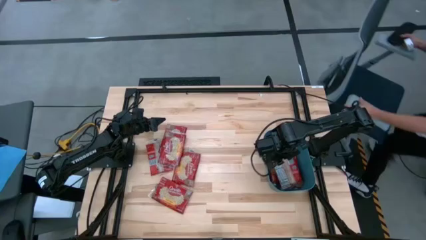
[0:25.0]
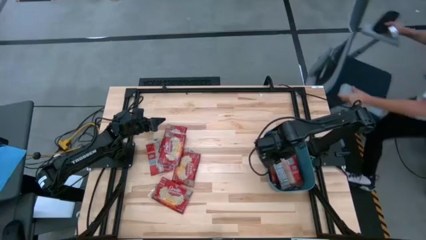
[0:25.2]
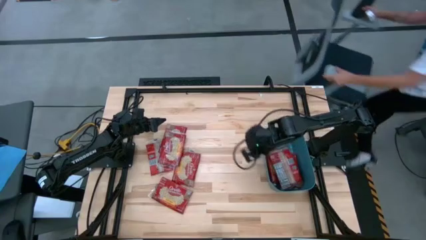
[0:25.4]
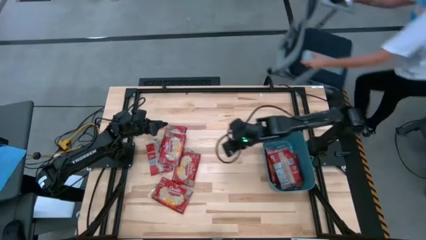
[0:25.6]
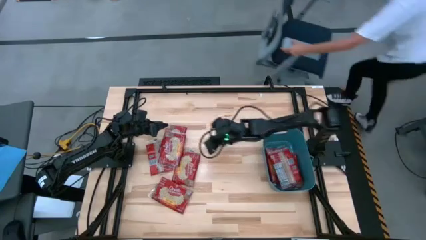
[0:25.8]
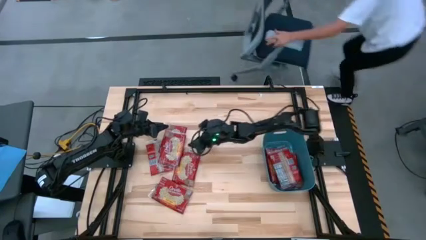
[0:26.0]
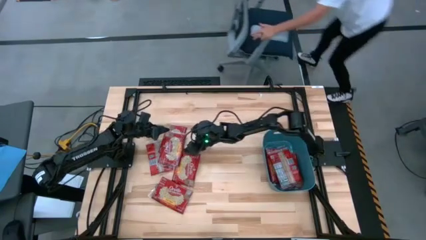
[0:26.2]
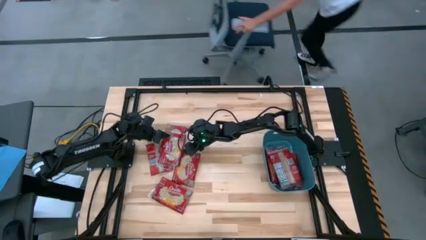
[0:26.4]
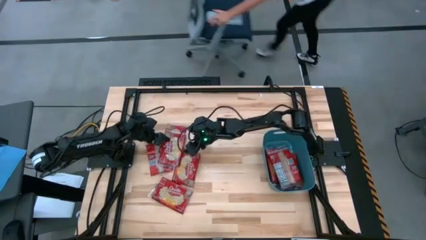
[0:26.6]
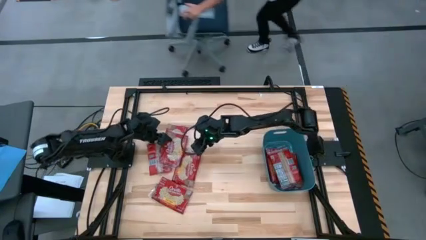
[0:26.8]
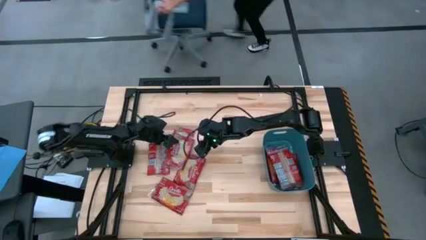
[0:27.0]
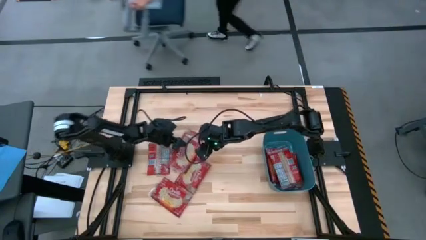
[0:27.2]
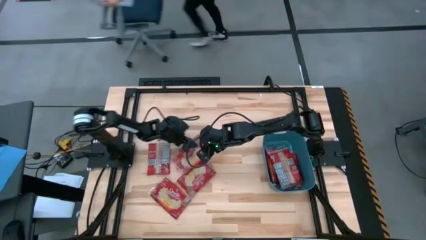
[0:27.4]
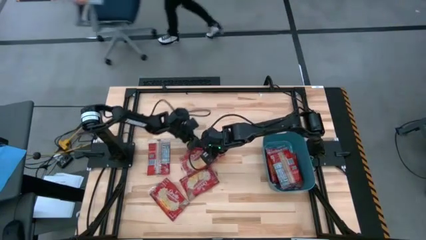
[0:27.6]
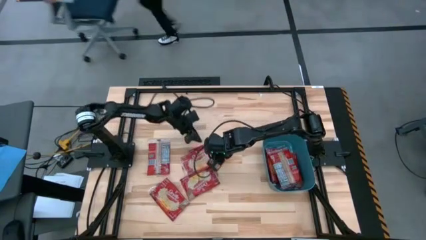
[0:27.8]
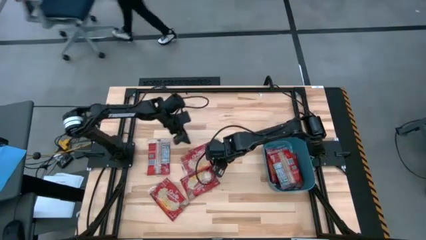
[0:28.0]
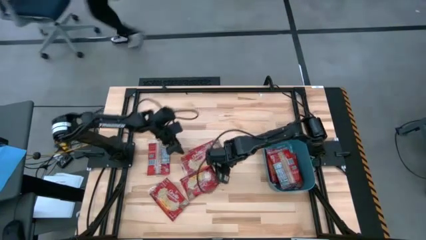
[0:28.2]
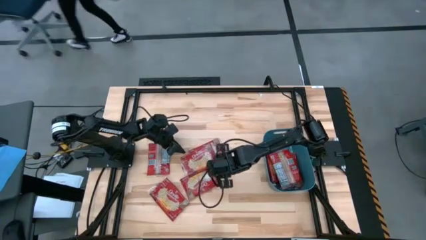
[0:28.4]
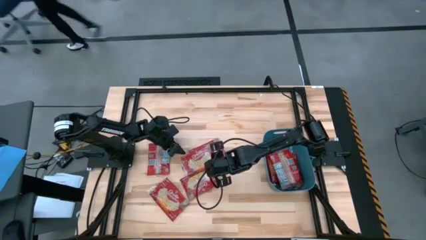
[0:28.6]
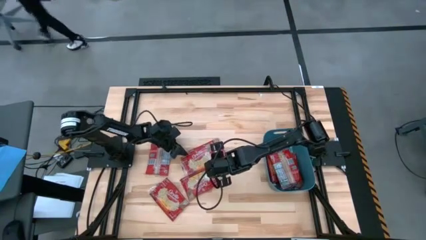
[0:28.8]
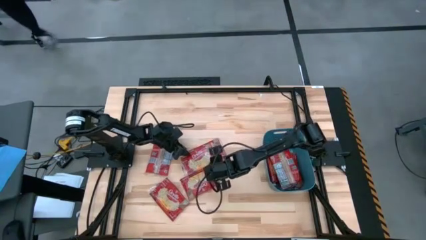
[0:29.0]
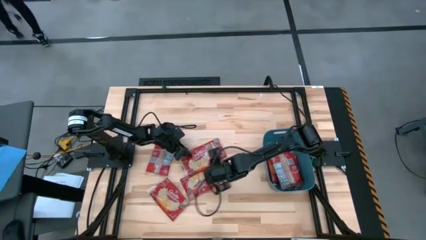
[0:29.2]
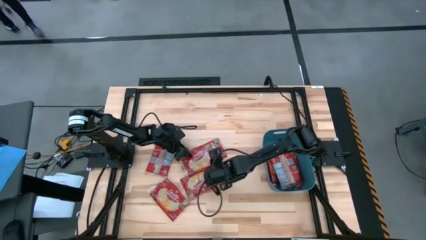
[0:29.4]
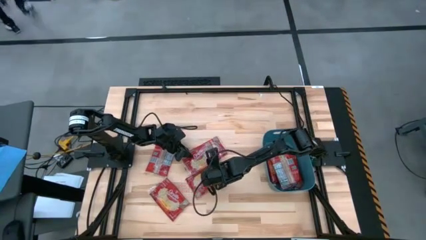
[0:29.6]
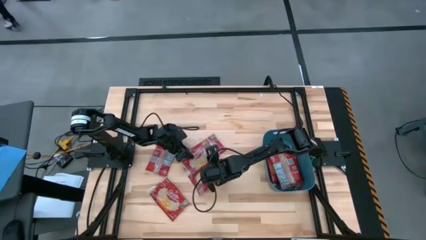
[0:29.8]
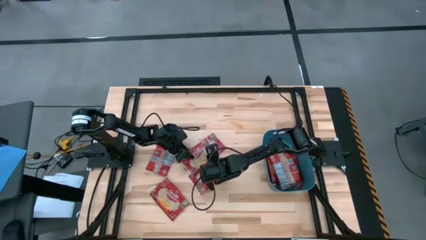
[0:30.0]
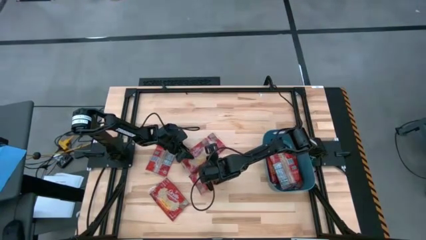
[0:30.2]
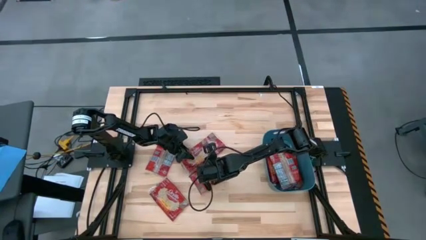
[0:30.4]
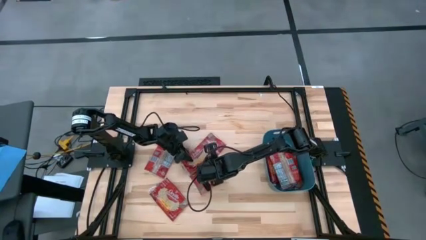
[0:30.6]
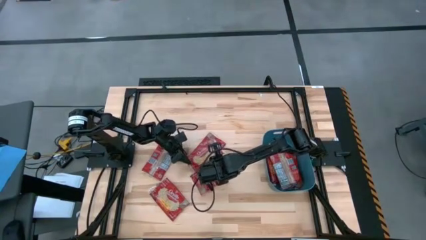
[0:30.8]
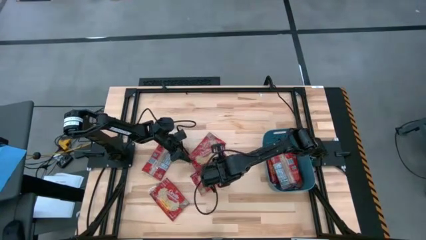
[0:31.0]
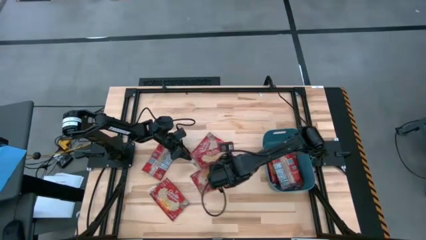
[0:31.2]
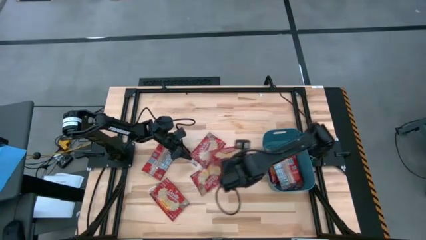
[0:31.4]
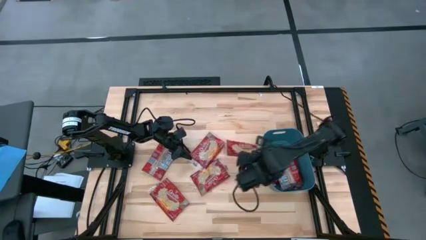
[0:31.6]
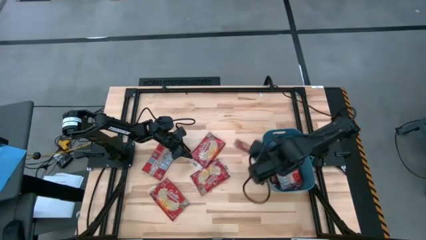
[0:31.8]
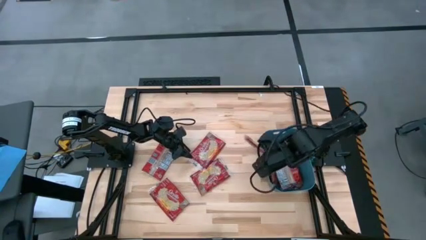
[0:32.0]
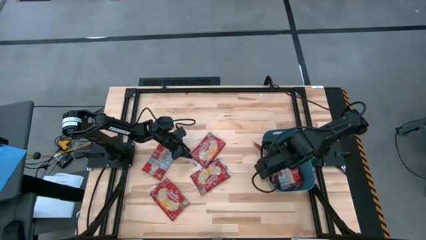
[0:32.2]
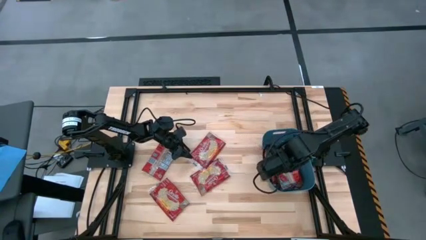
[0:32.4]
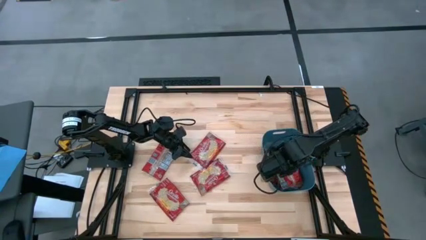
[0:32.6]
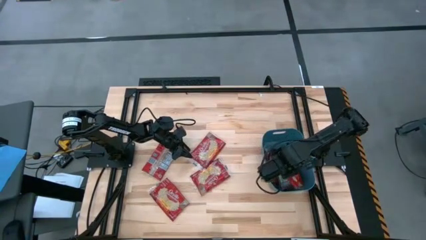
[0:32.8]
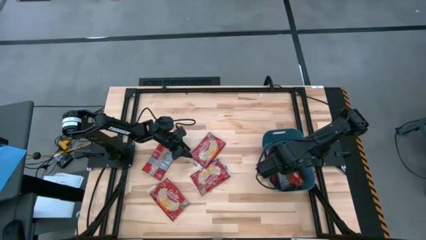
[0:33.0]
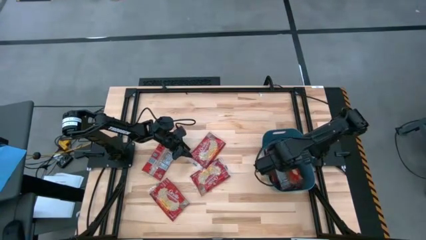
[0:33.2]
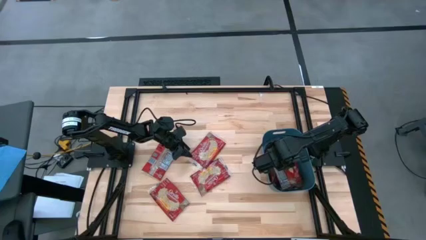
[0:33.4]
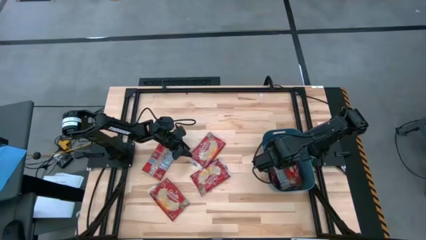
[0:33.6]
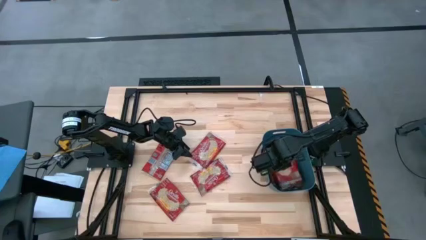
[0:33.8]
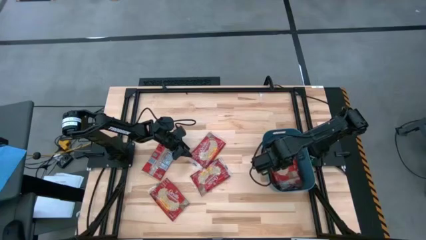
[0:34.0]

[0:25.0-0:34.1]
Task: Sort popcorn bags into baskets
Stack the popcorn bag into the blue bin

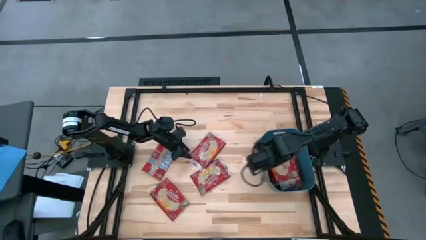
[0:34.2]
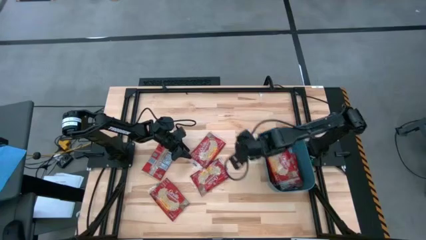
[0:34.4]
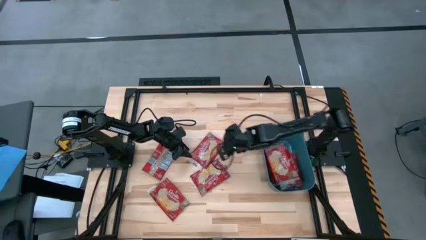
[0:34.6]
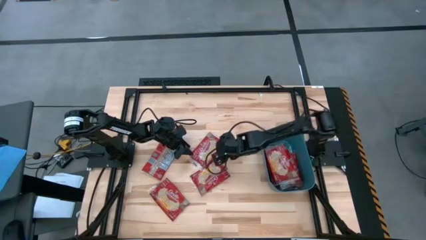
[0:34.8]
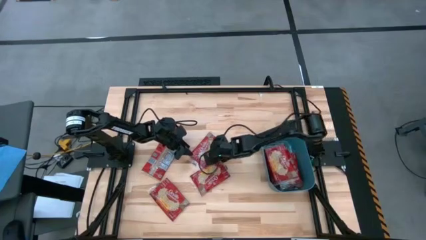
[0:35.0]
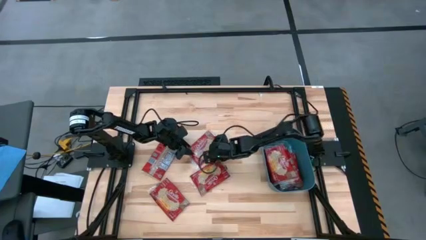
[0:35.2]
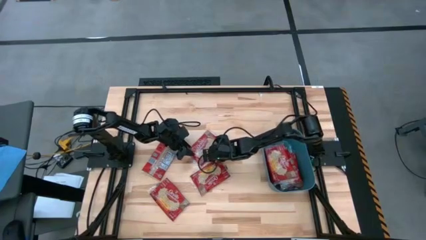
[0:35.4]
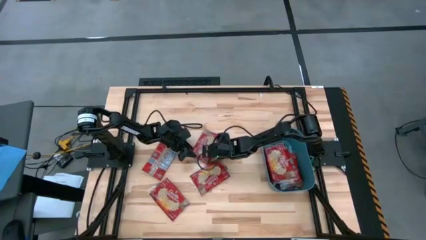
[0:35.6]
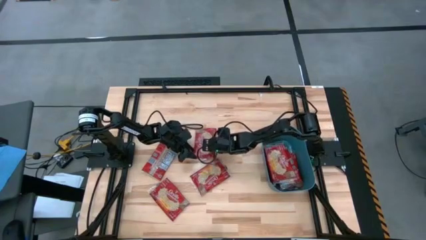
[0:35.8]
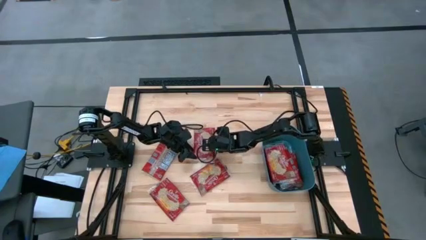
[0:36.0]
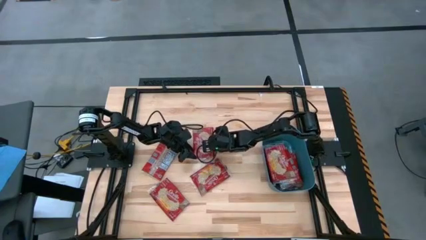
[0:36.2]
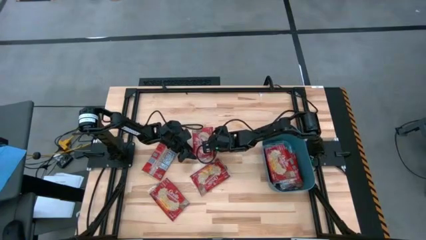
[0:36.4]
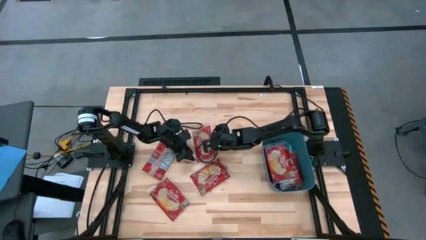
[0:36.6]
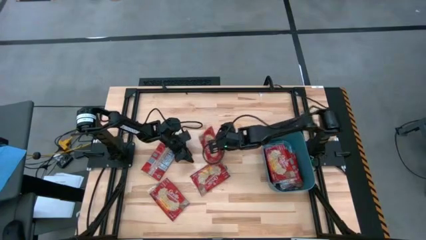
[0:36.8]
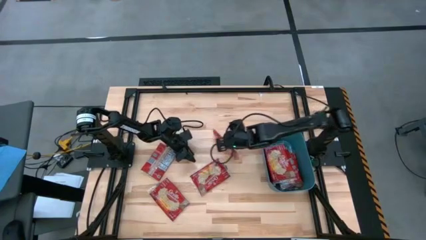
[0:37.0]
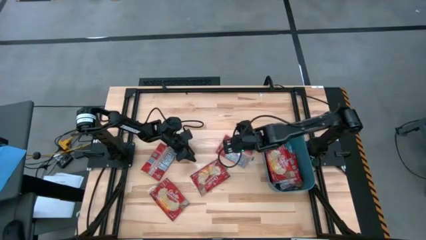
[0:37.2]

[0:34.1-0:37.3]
Stack the popcorn bag into the blue bin

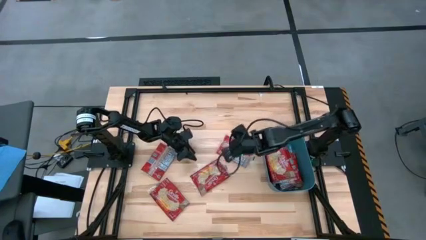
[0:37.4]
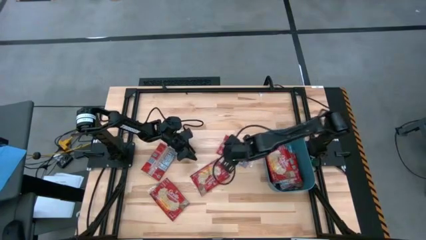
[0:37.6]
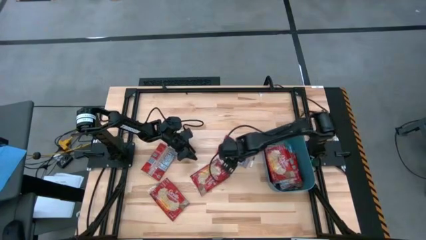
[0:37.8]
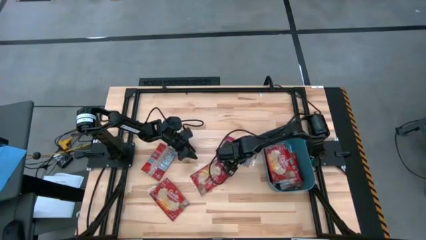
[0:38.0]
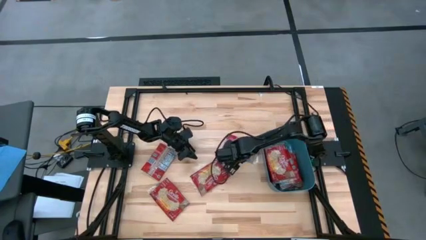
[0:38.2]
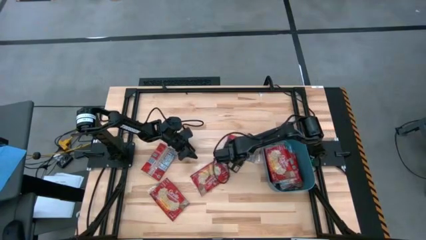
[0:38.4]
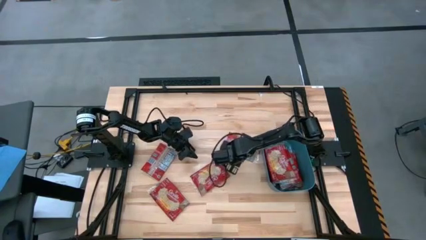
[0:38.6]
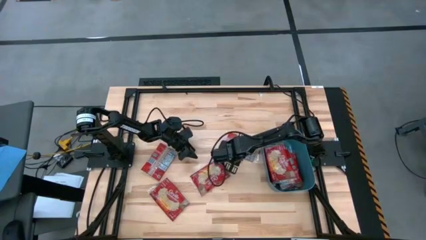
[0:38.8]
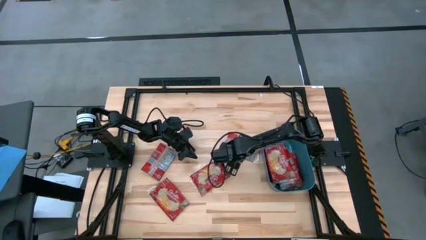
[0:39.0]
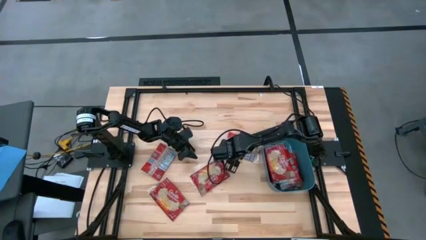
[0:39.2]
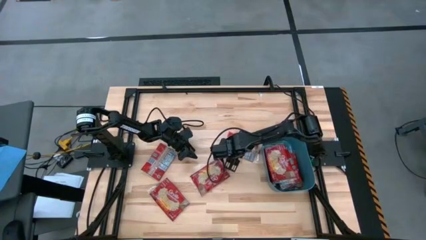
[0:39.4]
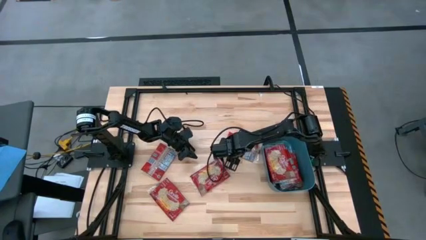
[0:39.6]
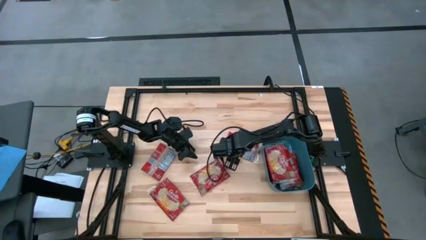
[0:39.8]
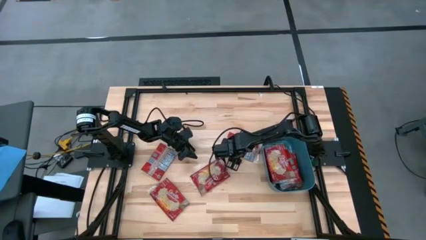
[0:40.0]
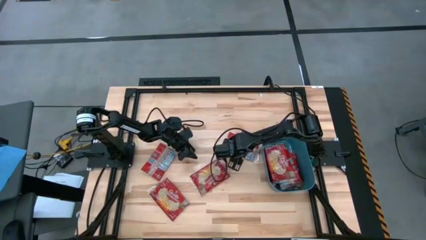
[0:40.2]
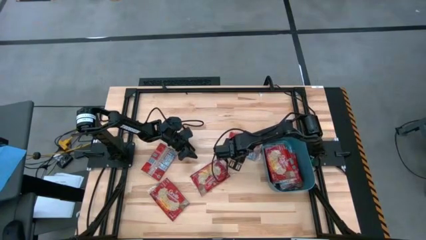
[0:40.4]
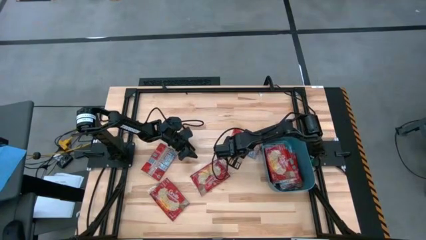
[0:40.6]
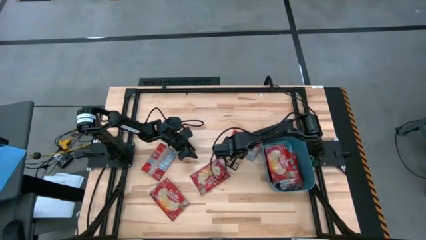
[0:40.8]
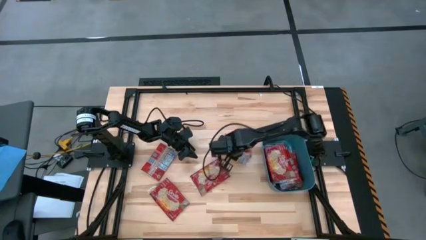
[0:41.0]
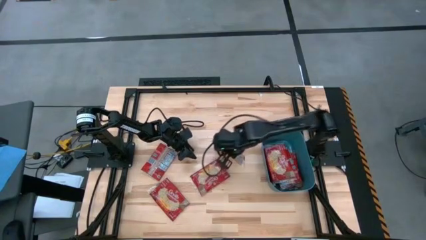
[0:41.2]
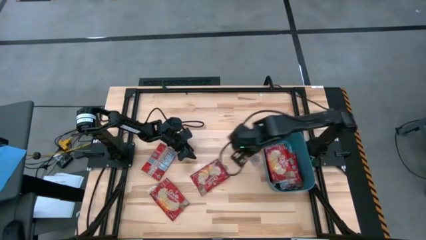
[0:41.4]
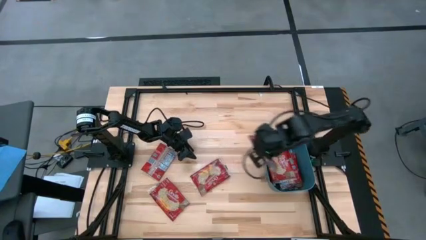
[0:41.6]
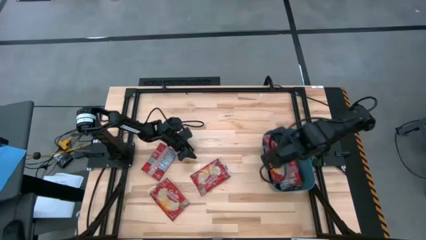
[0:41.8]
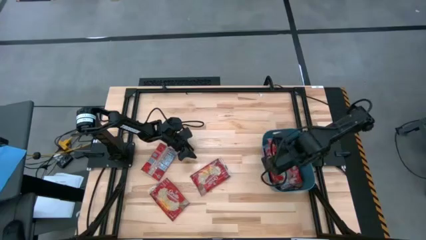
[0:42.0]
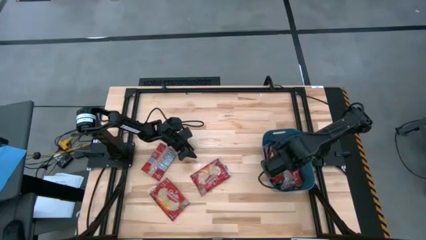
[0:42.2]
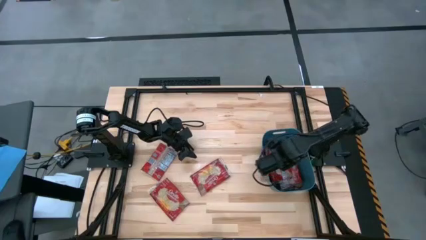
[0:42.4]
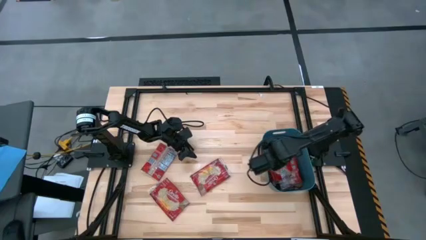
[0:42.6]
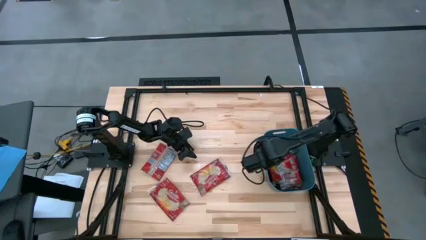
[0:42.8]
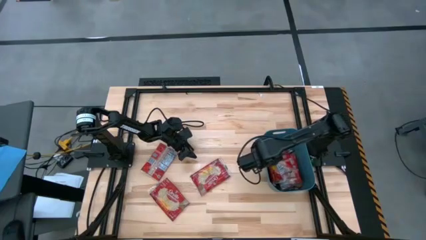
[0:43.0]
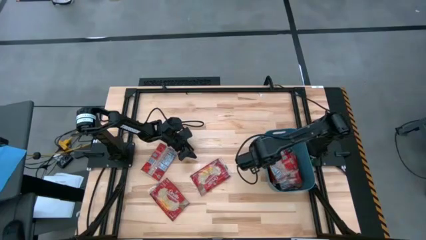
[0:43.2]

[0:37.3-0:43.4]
Stack the popcorn bag in the blue bin
